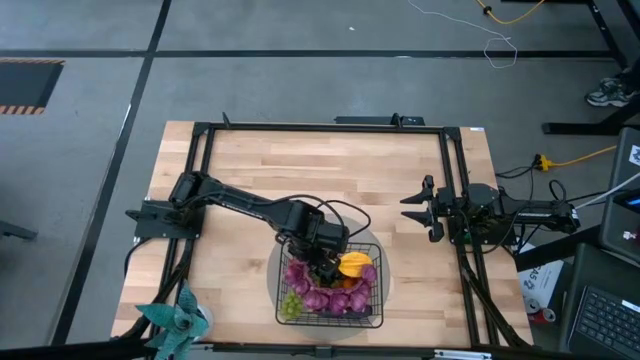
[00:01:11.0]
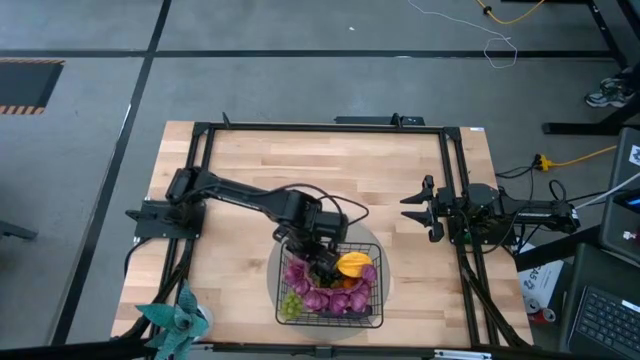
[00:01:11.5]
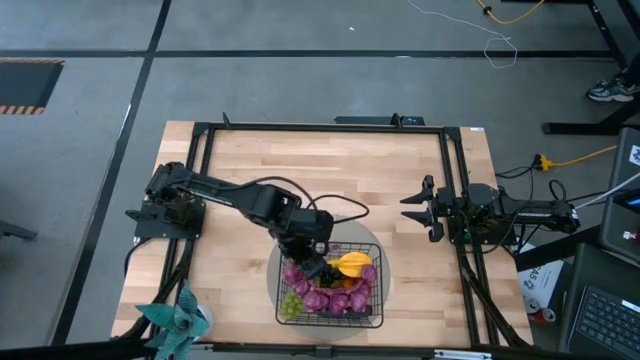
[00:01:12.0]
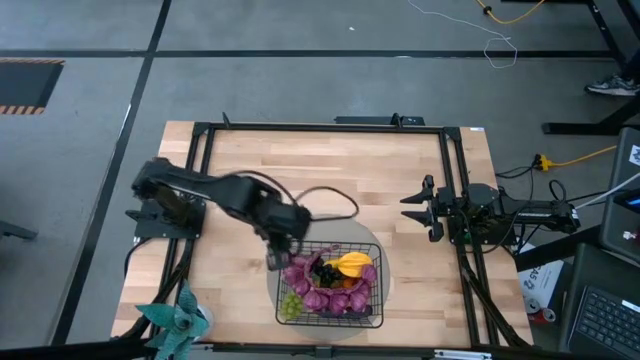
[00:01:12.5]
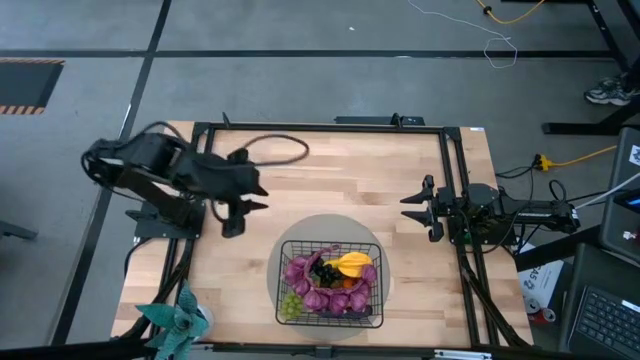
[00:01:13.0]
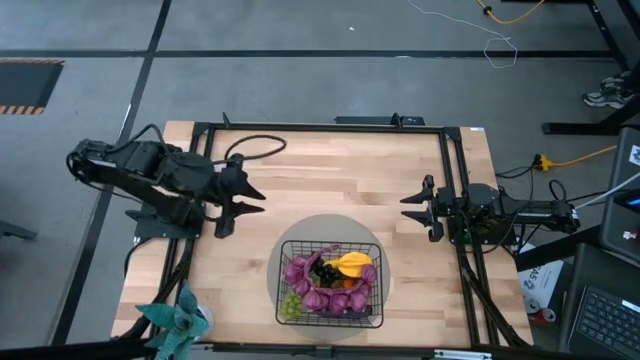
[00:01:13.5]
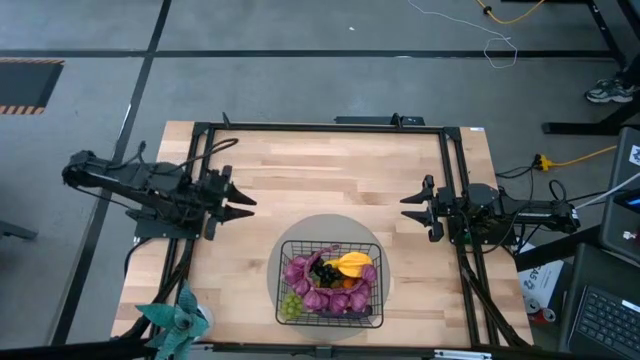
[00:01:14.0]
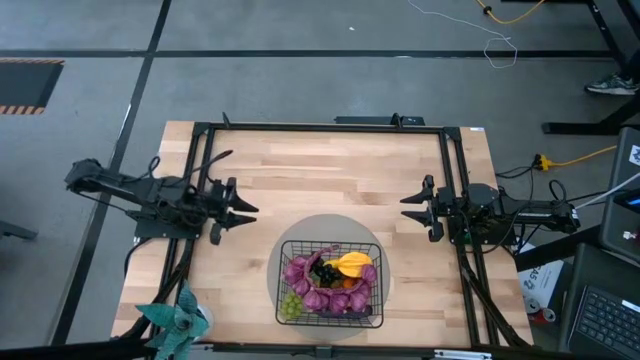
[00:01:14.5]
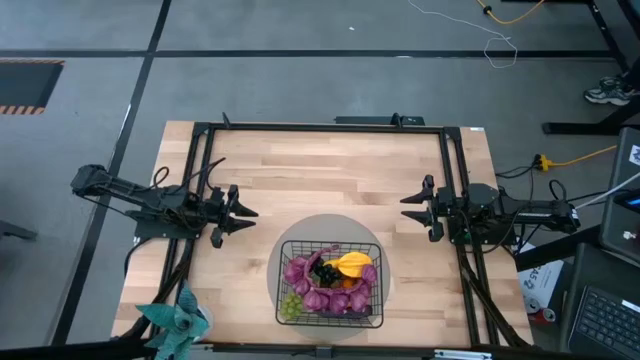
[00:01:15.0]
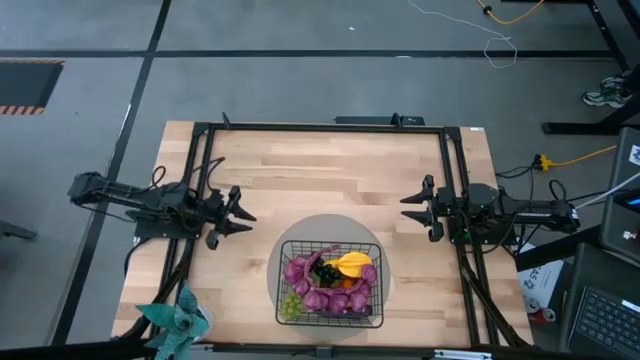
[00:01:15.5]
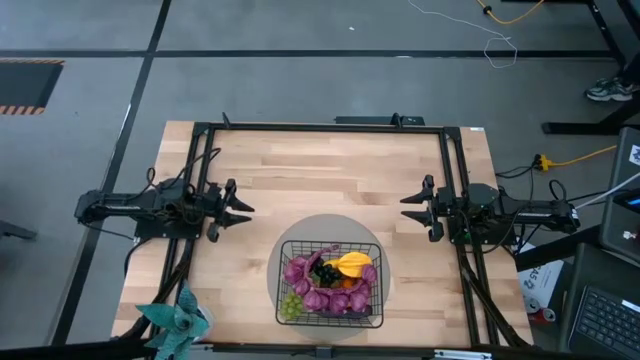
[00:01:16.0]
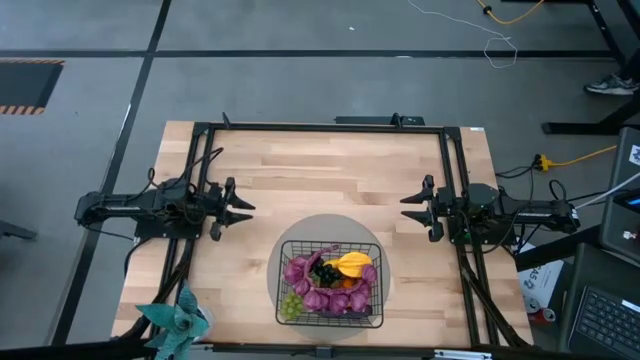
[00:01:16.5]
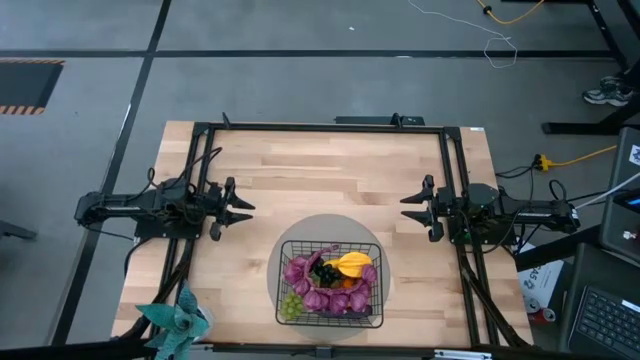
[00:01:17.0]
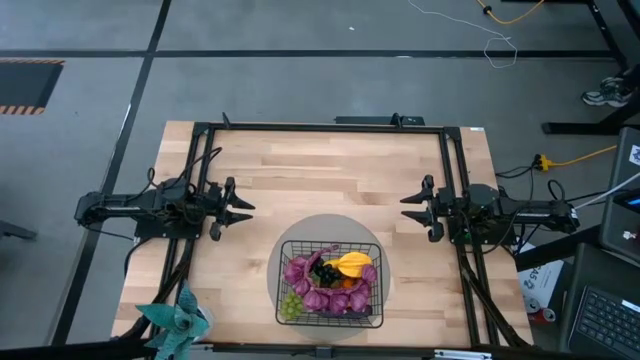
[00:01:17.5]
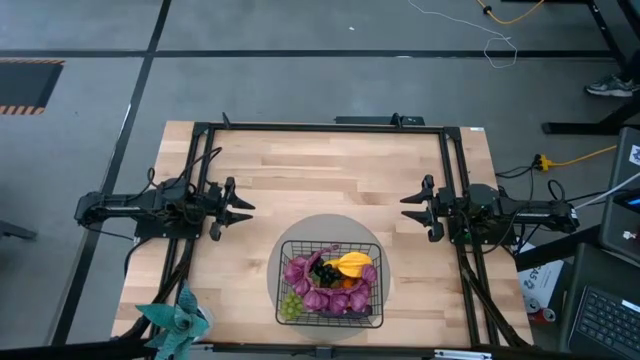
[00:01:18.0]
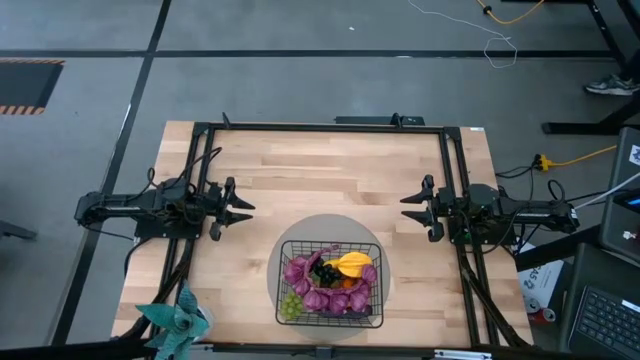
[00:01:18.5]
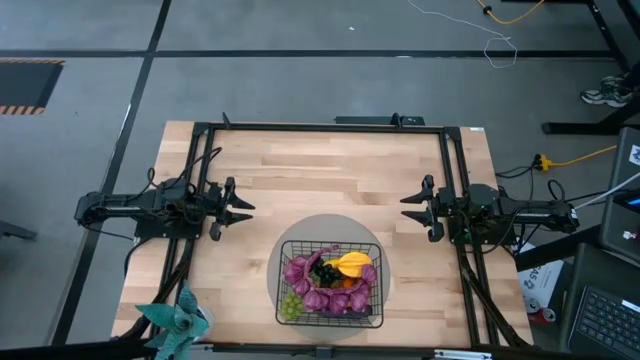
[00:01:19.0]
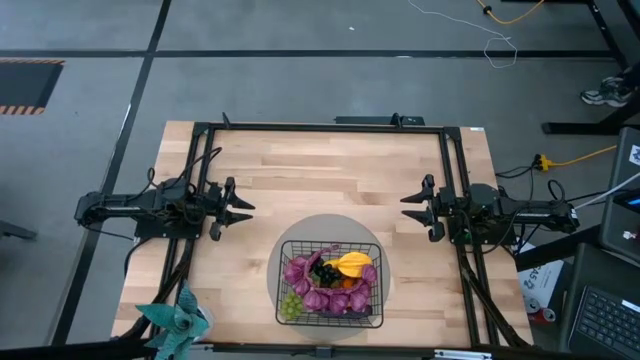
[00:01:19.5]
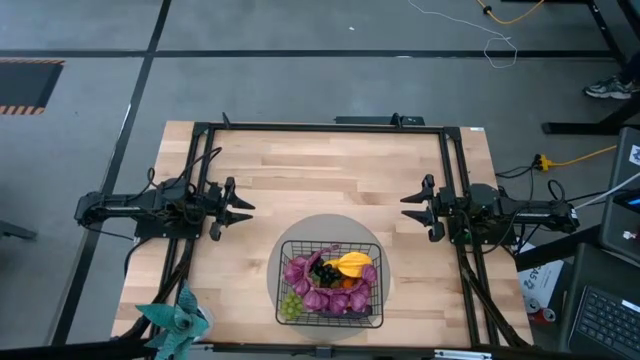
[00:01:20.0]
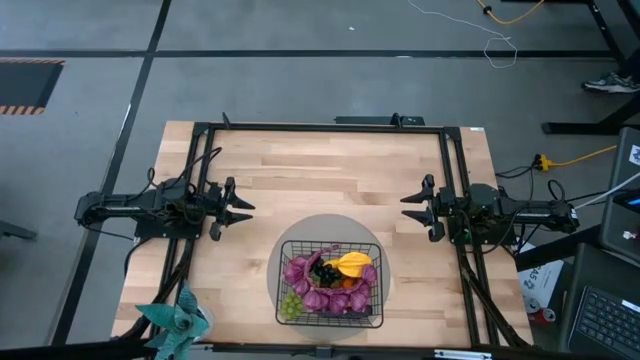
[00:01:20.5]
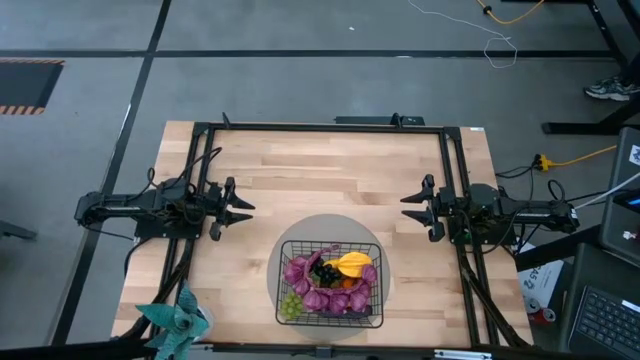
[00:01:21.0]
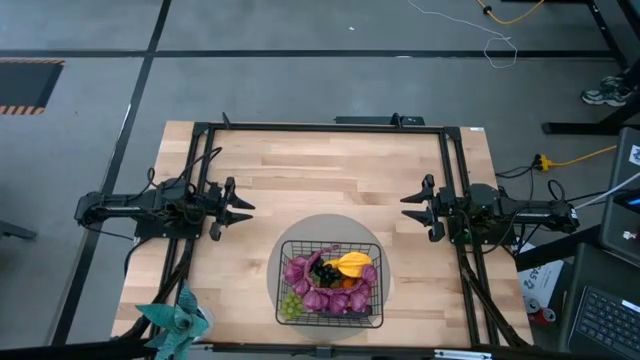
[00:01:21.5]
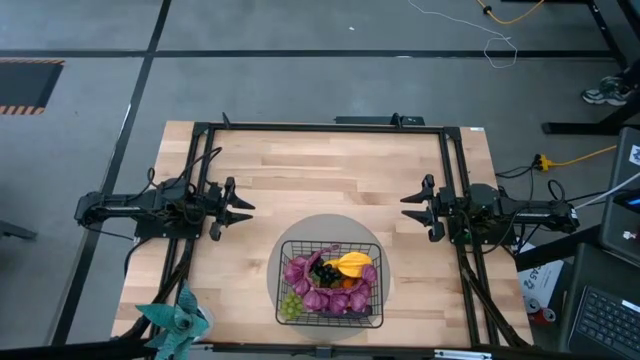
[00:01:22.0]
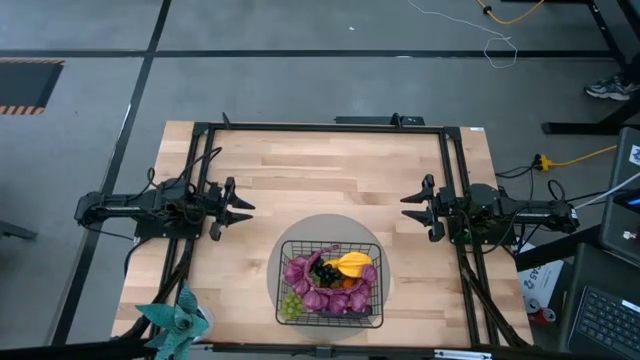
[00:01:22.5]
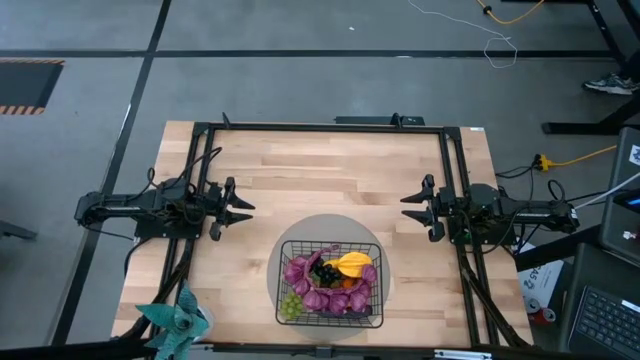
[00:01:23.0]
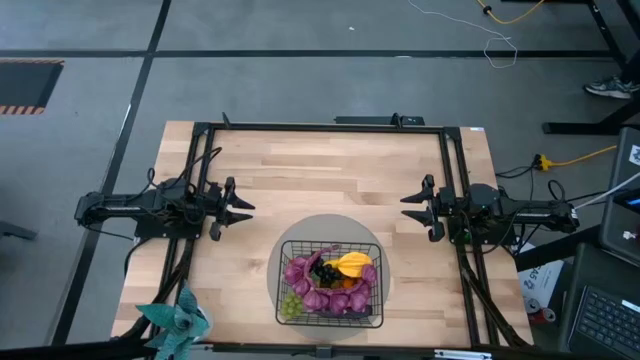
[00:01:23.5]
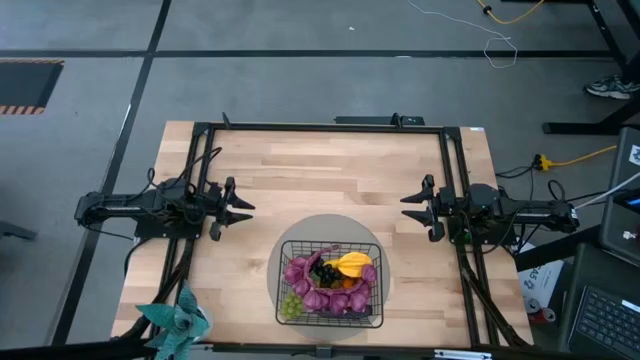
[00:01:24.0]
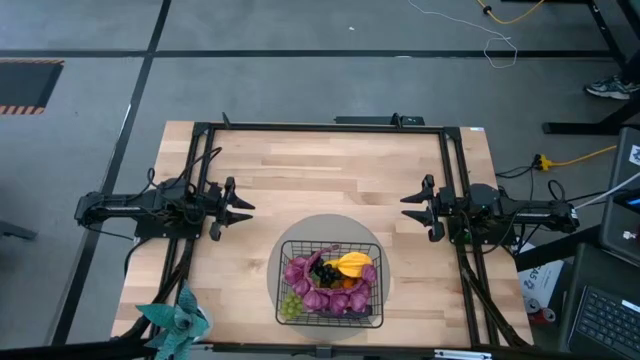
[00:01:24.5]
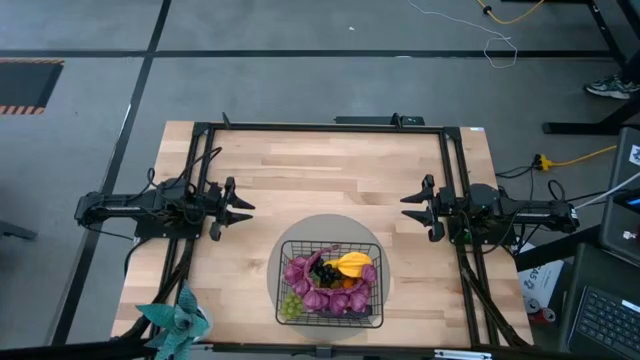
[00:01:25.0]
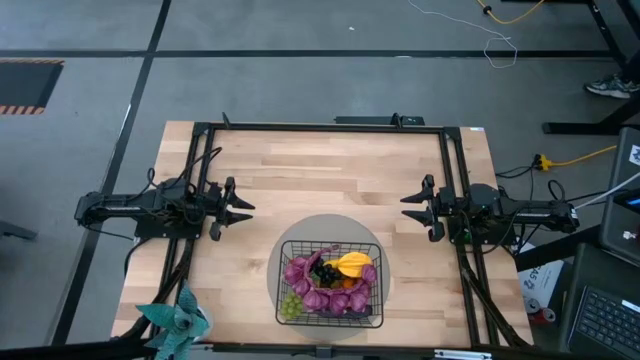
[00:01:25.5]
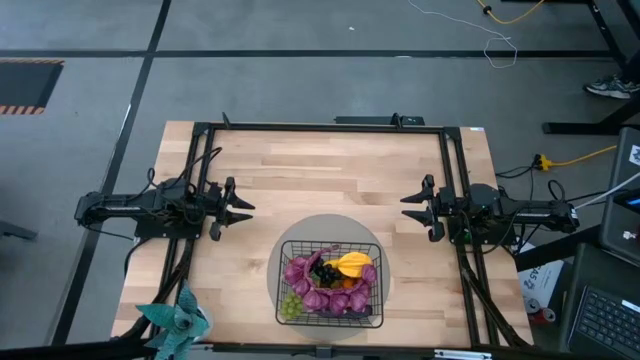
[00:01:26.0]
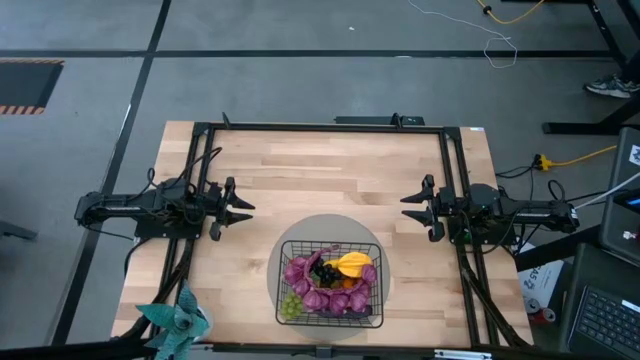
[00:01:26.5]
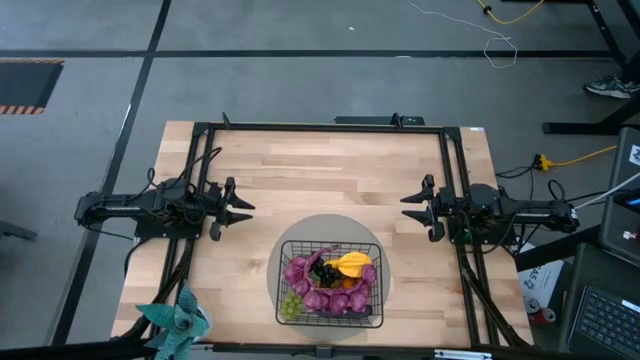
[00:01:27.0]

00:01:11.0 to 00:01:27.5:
Task: Build produce basket
Return to Home Position

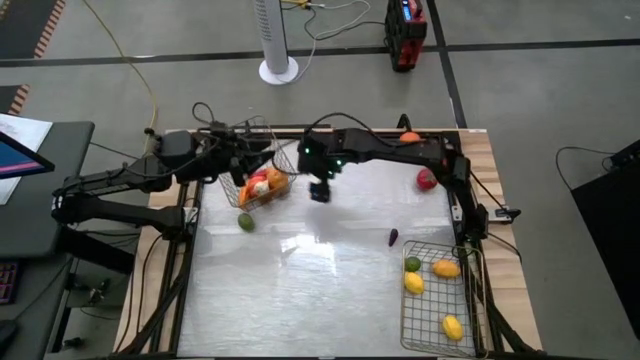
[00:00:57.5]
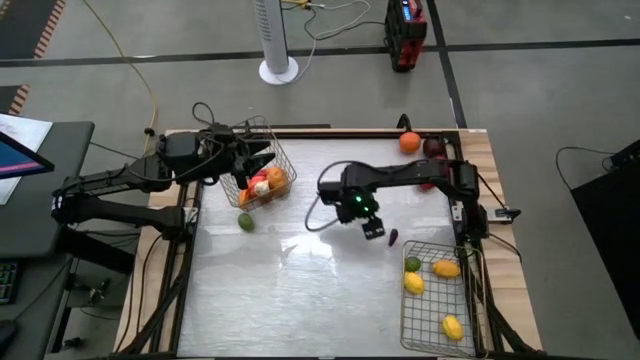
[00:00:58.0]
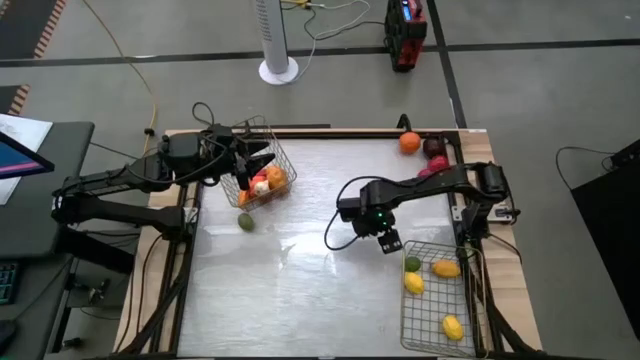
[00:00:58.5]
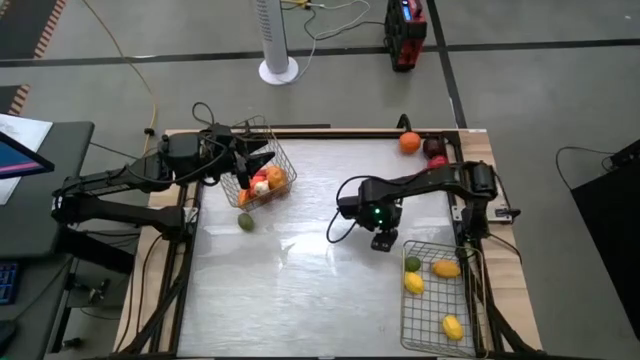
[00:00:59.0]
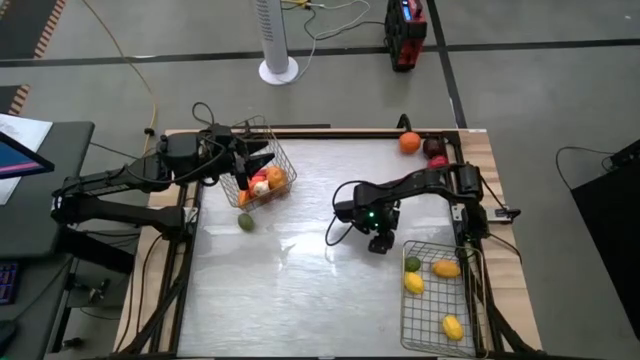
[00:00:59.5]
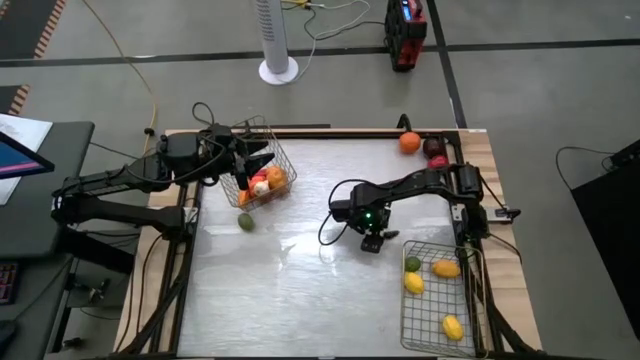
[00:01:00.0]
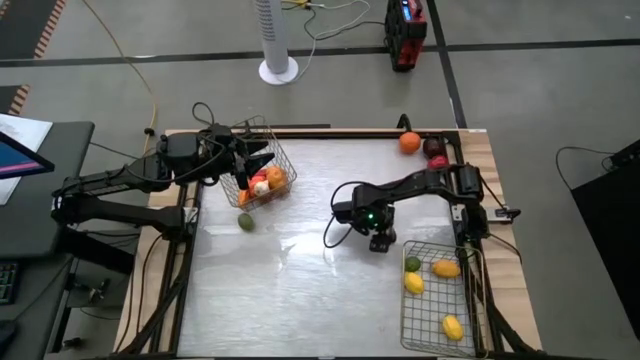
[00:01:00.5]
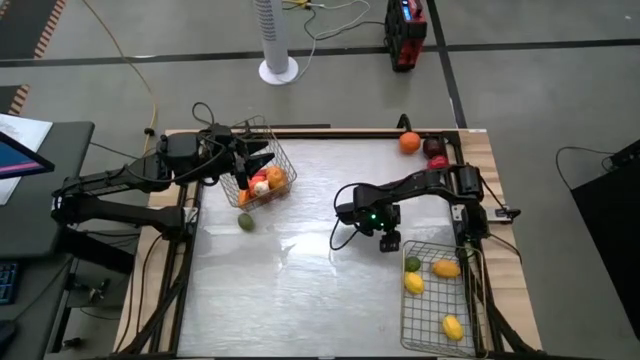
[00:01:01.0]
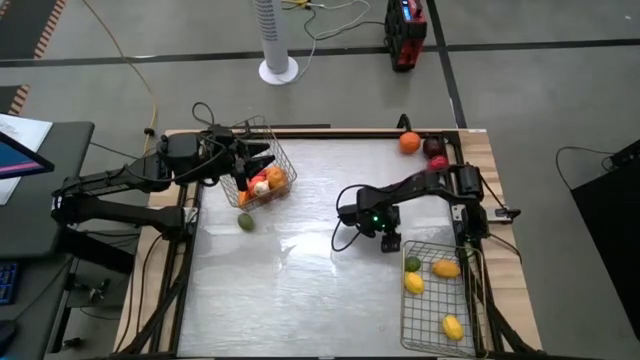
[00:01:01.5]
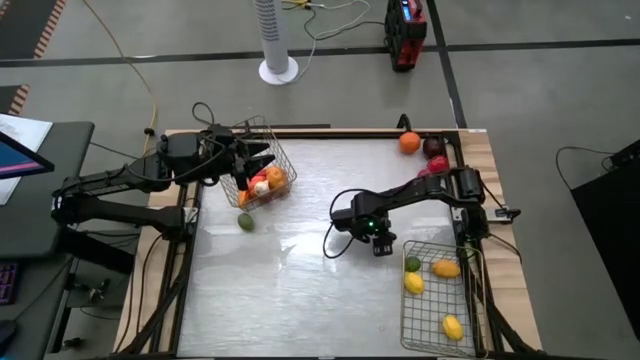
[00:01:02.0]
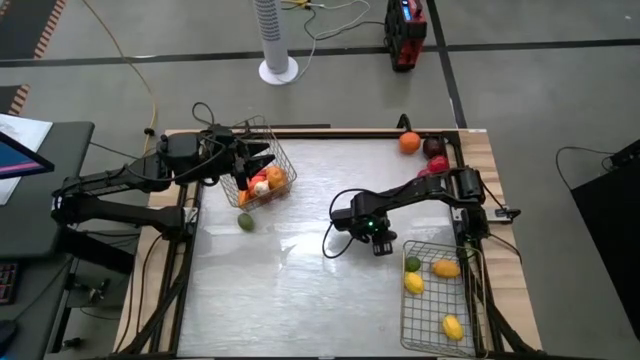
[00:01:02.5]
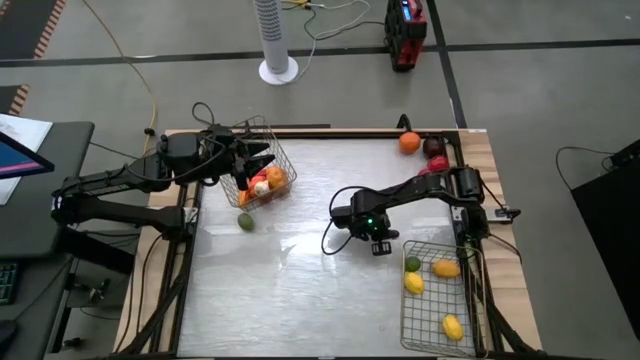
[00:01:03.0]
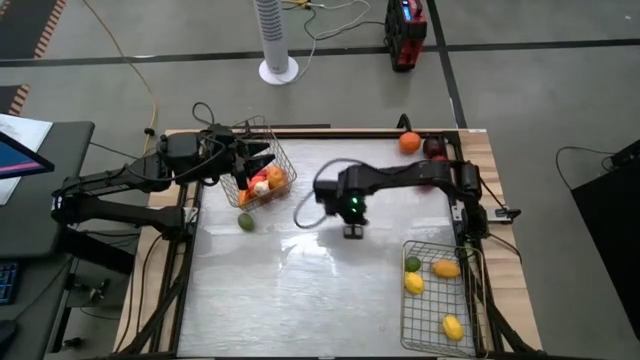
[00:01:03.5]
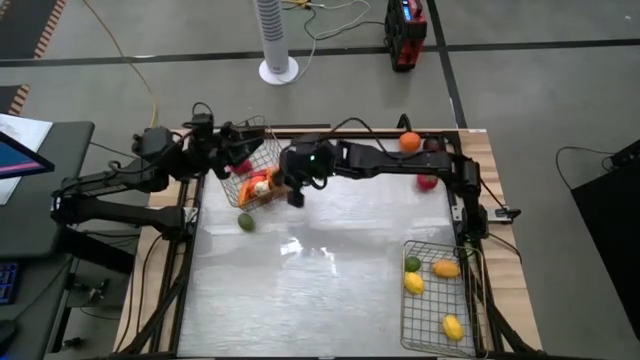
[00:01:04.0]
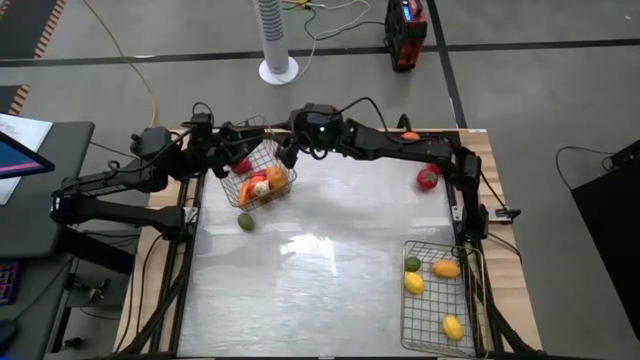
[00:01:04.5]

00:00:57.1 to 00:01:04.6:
Task: Sort produce into baskets
Put the eggplant into the top wire basket
